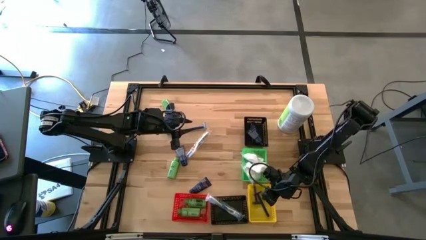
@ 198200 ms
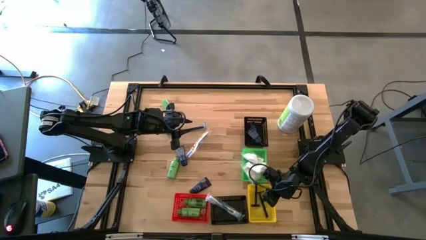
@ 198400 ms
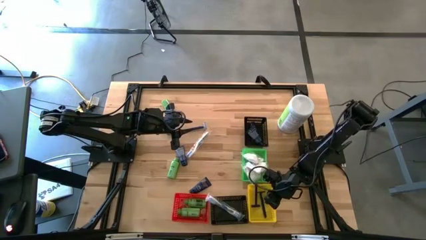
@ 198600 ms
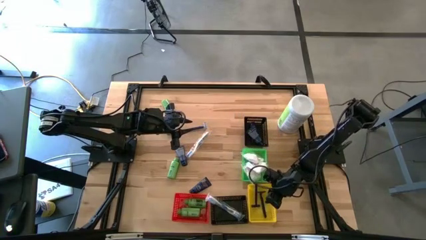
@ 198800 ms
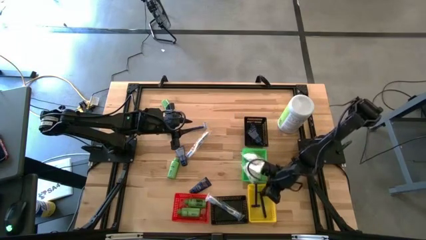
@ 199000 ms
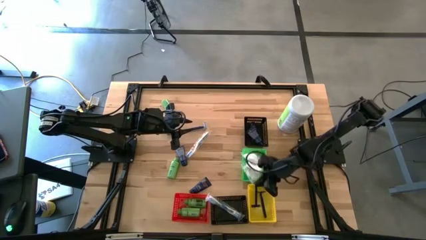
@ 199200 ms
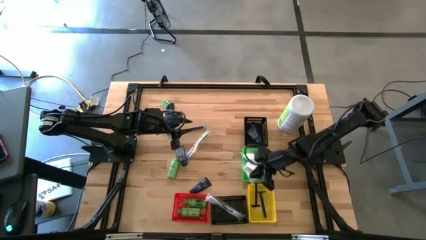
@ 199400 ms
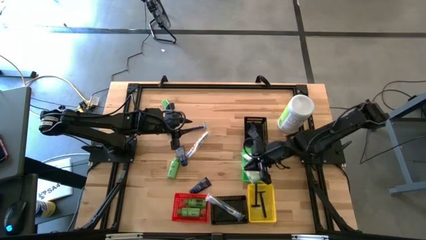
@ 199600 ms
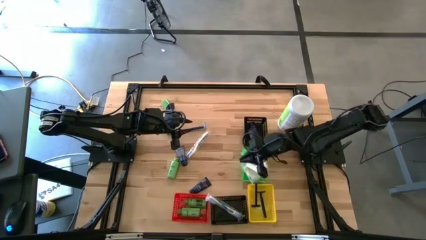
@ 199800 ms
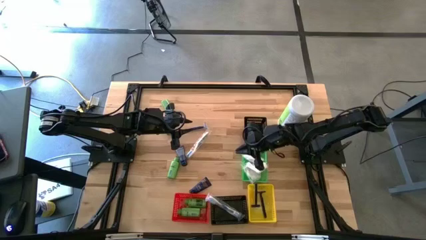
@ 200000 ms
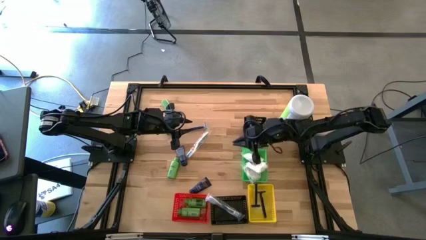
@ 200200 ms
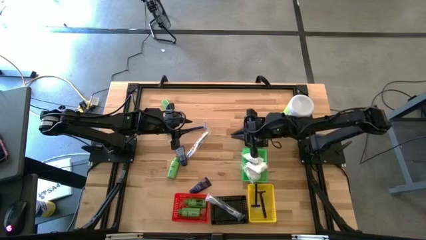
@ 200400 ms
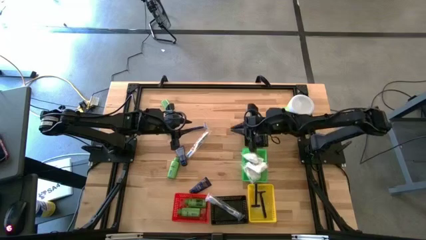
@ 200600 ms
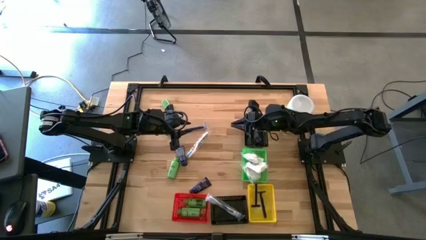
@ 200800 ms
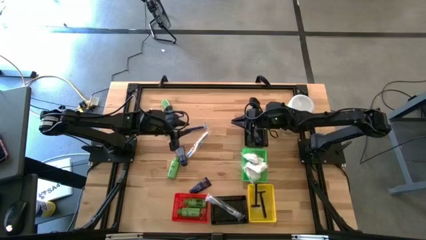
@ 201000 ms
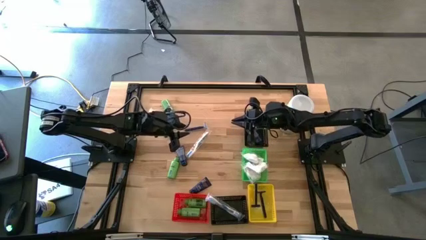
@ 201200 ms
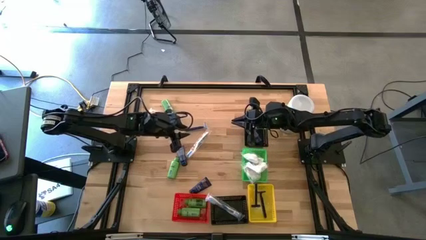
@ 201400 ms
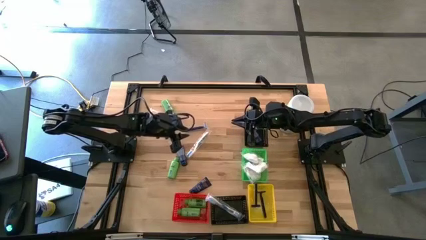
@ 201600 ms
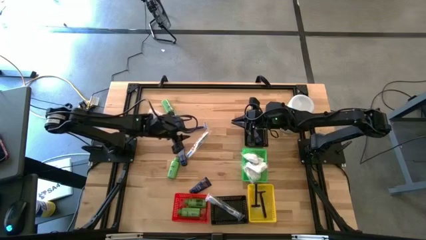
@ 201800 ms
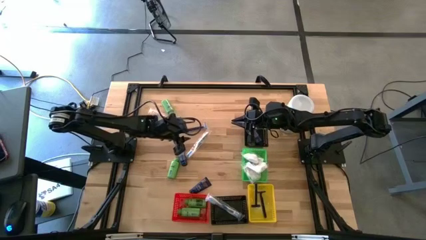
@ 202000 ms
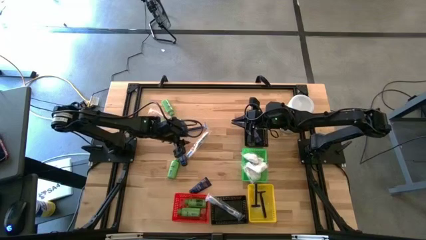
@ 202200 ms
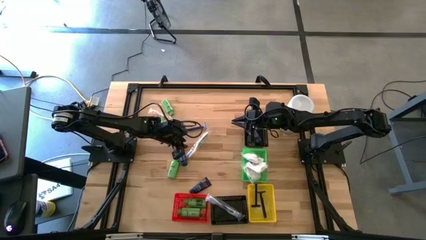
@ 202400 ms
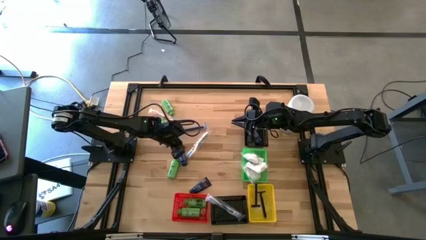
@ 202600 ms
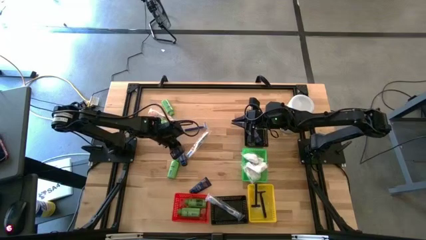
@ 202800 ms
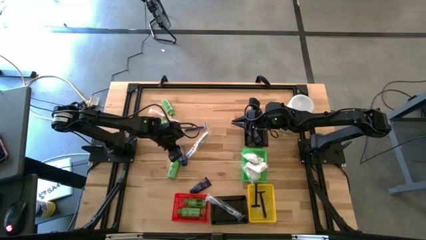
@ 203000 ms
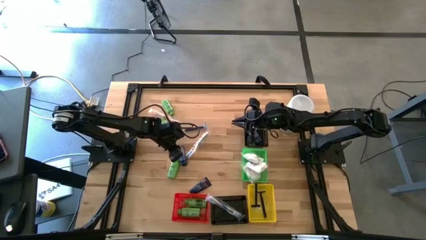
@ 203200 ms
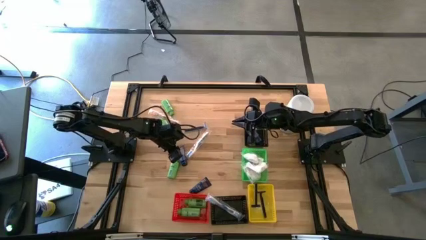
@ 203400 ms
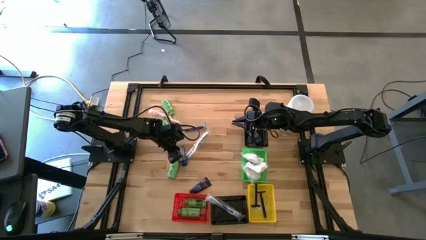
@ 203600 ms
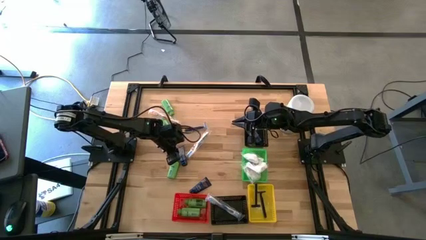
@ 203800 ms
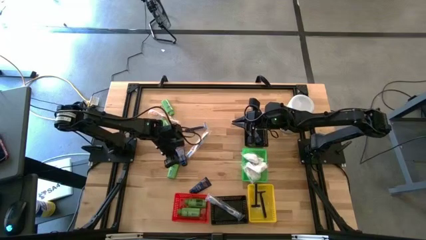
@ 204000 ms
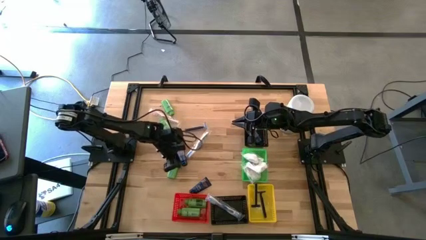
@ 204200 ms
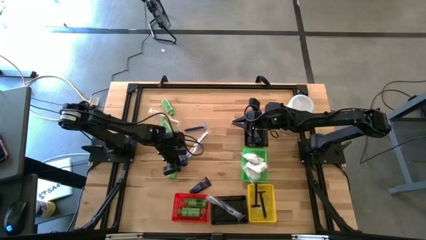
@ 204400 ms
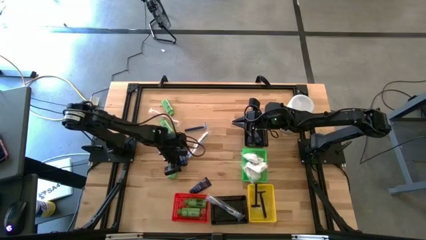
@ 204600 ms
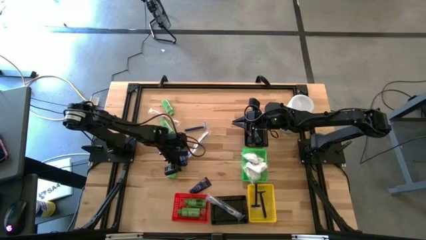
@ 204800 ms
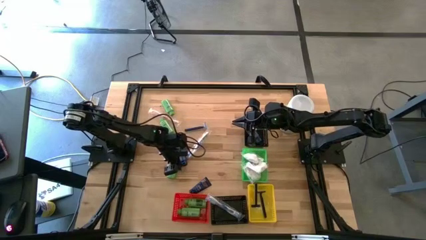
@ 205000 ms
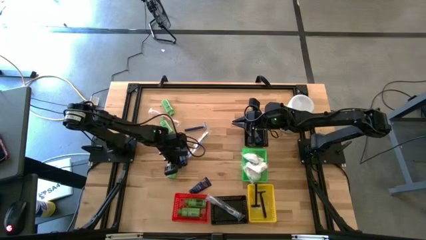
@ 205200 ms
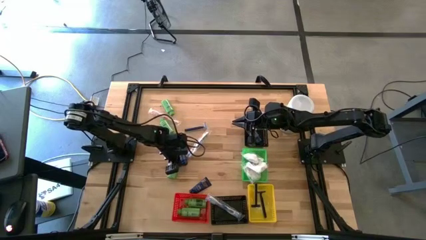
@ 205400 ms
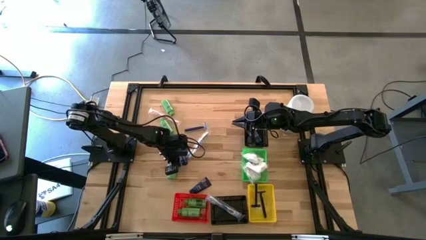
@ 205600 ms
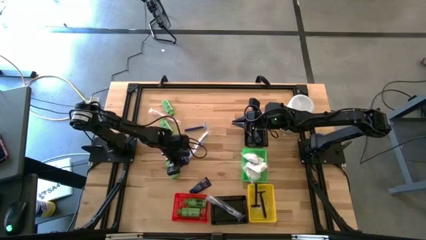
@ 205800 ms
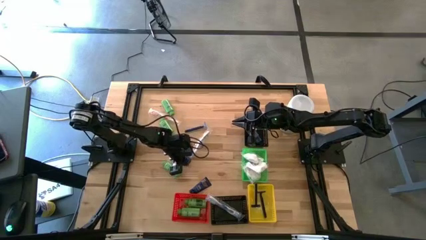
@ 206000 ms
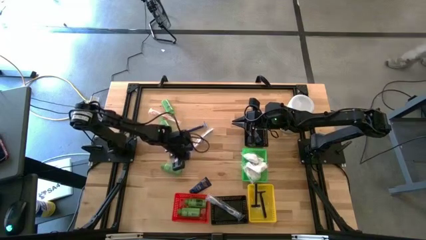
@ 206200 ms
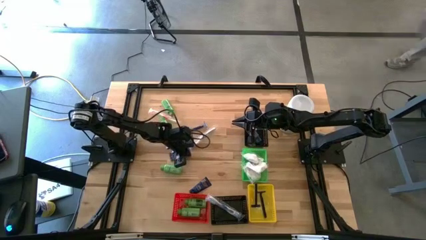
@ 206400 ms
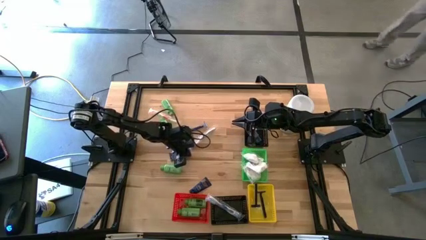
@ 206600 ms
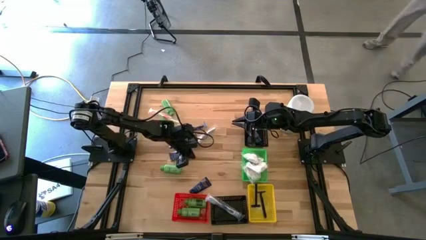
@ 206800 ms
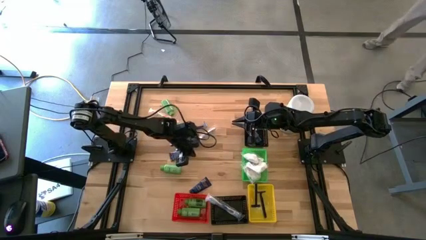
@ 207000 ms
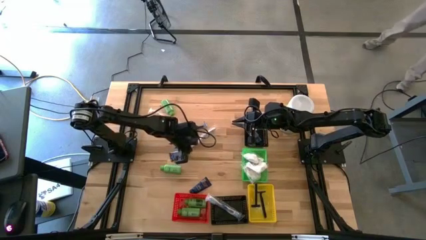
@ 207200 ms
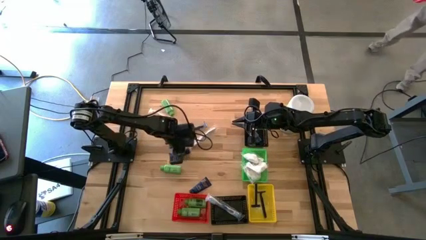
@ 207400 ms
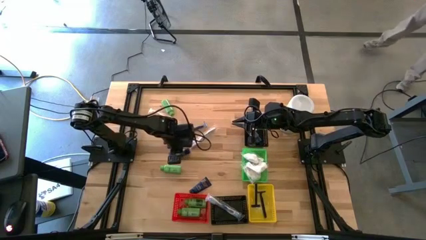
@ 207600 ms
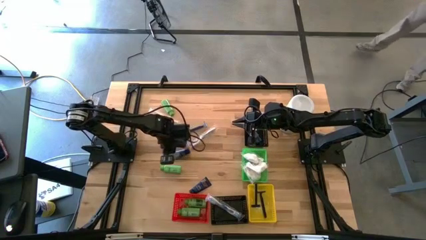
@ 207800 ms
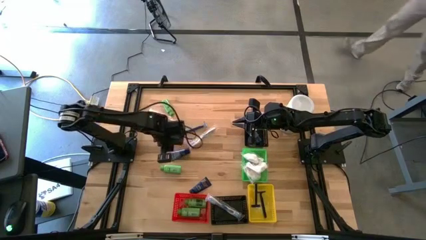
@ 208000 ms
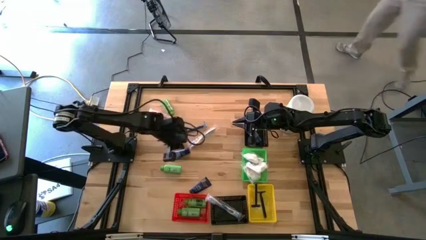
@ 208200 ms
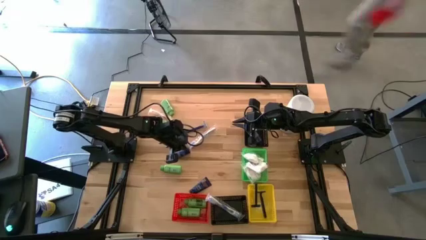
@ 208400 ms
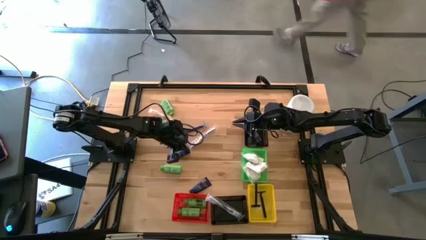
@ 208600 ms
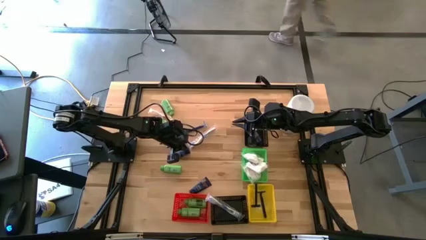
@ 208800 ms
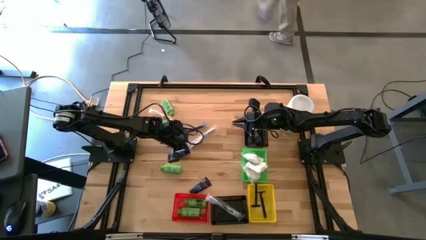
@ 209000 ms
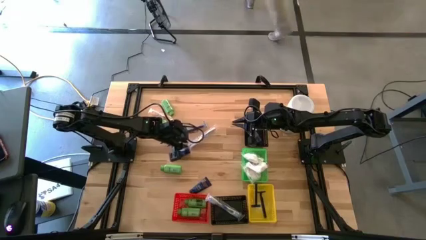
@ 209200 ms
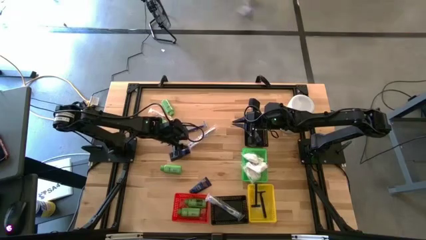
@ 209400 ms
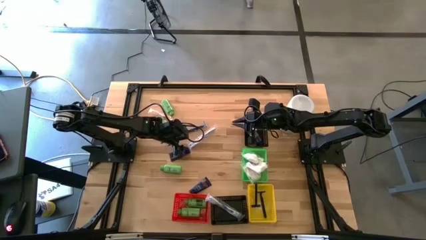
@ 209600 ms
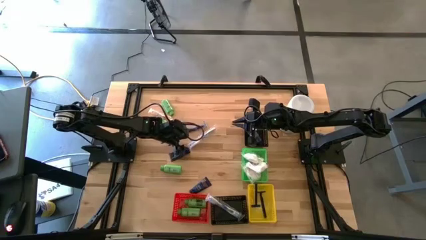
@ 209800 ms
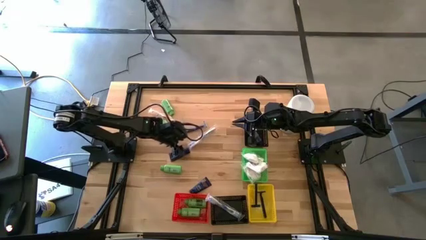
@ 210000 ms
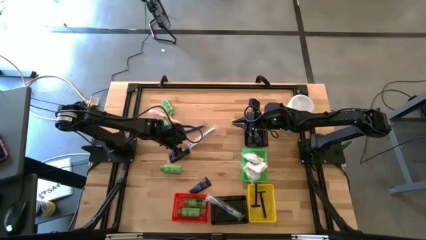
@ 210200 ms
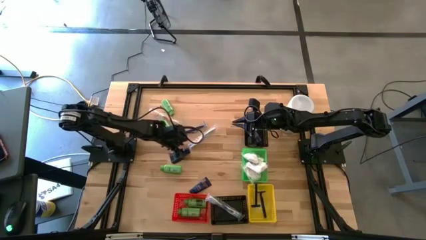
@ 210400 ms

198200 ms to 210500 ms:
Task: Pick & Place Travel size toiletries
Put the top blue shaving cream into the top black bin

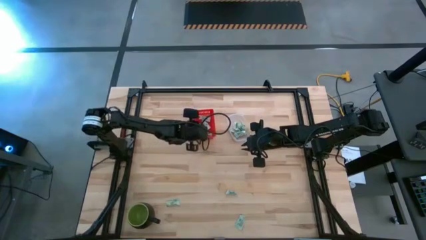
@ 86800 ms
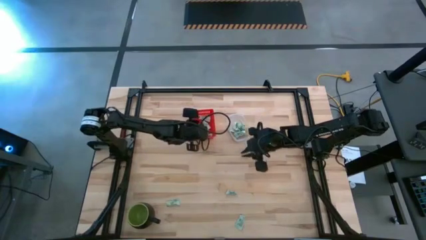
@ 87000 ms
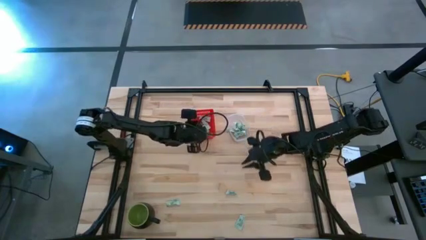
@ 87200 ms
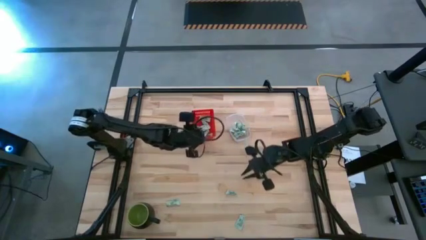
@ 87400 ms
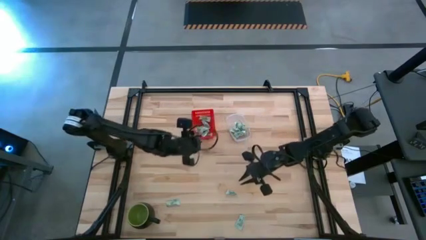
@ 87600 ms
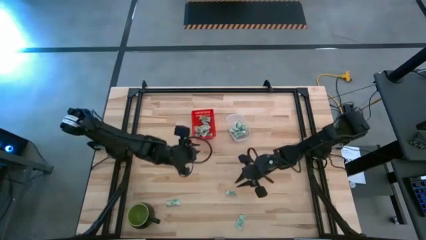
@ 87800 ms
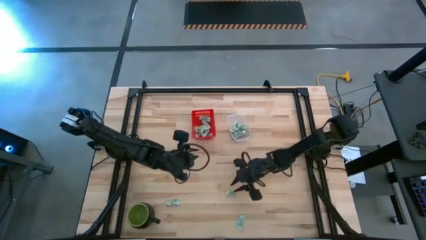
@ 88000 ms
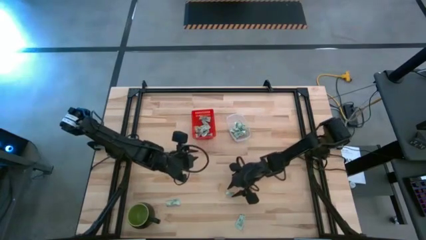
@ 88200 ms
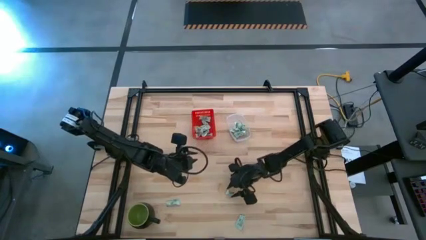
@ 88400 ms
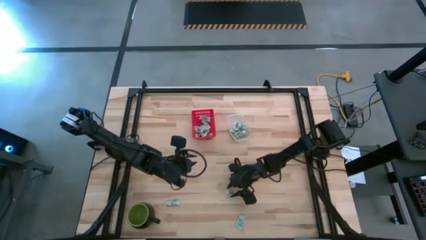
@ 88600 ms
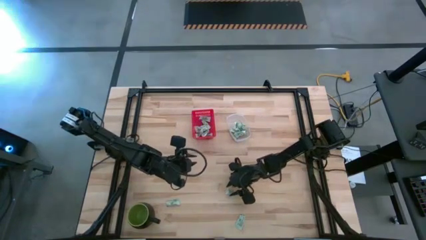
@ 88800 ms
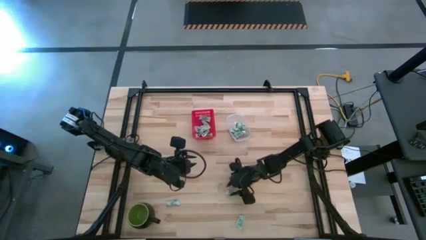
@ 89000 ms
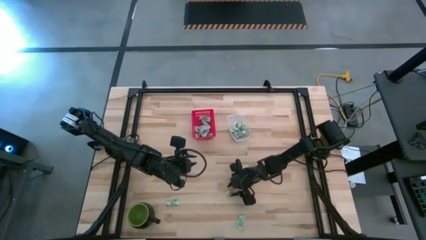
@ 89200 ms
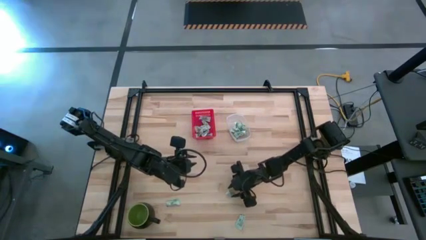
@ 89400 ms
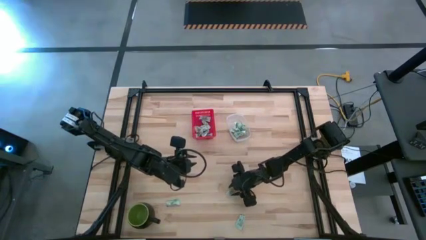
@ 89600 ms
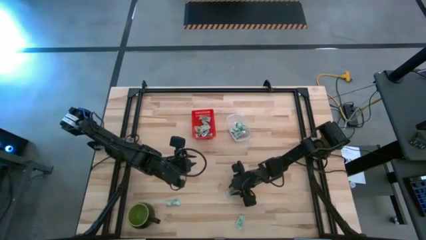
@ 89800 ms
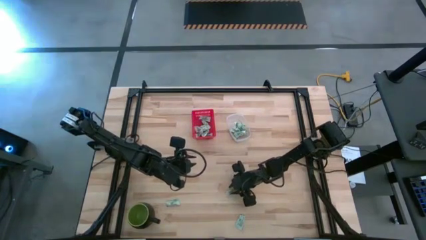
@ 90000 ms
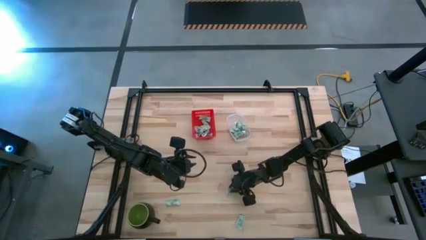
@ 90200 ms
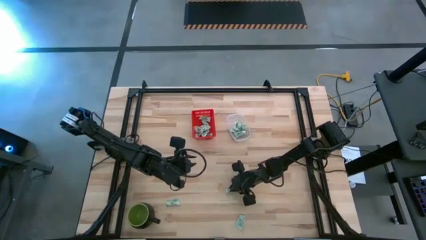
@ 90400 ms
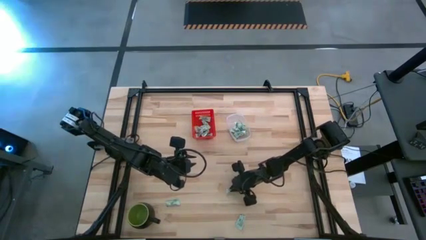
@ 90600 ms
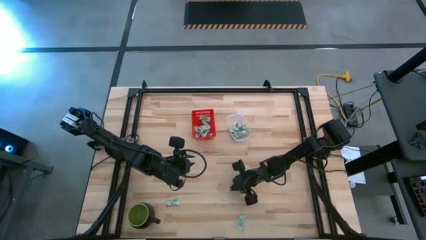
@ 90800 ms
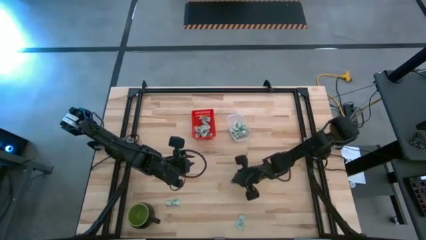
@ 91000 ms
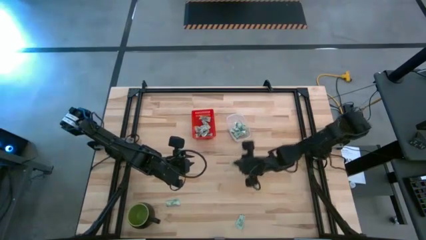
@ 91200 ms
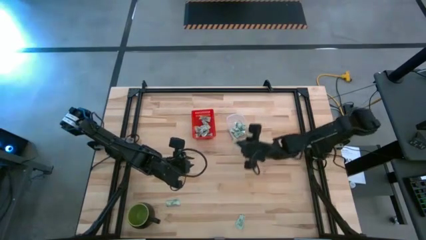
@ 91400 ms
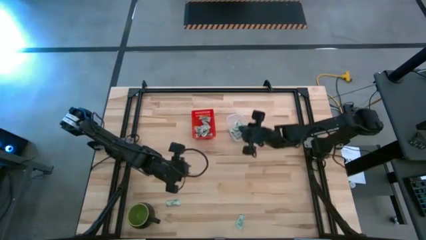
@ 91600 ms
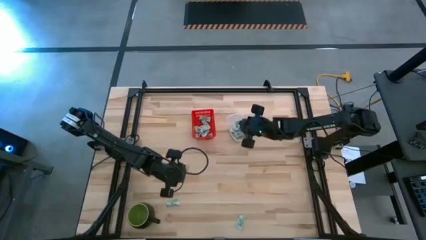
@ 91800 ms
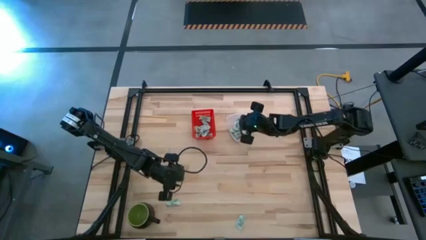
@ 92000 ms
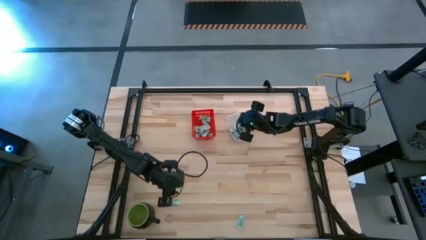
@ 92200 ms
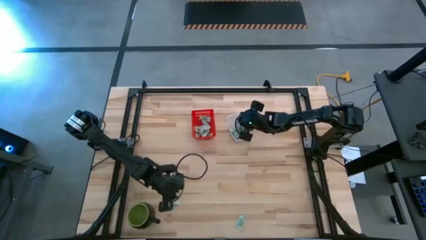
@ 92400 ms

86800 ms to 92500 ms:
Task: Pick and place items into bin
Put the white stevia packet into the transparent bin
